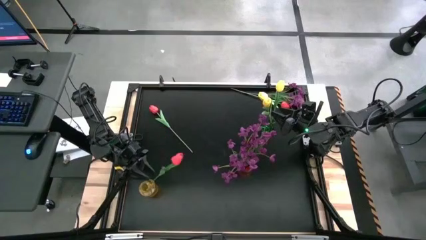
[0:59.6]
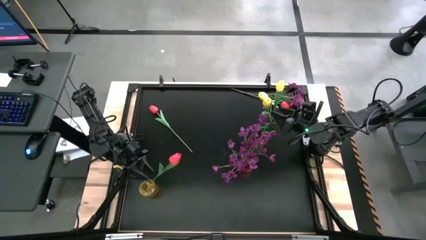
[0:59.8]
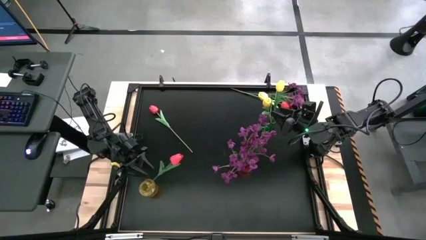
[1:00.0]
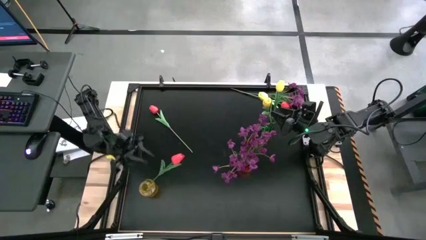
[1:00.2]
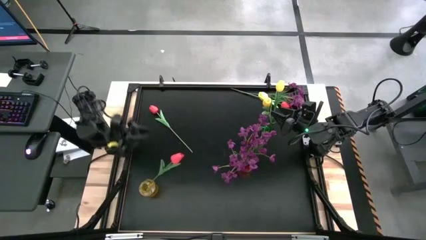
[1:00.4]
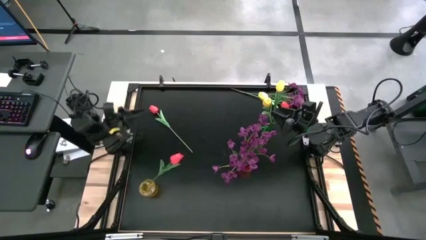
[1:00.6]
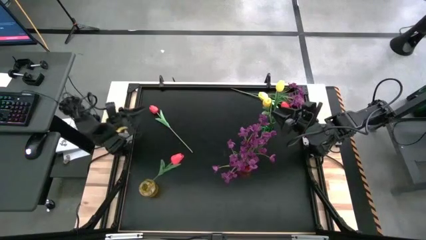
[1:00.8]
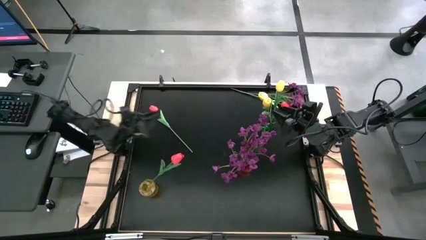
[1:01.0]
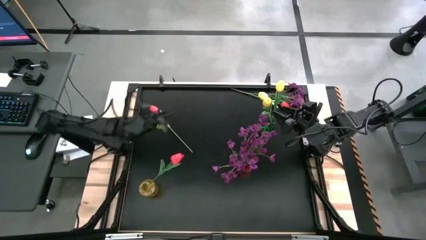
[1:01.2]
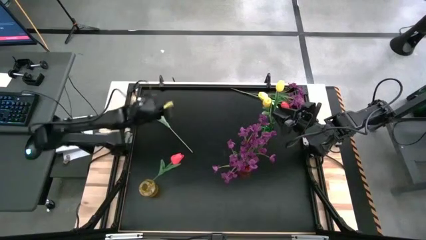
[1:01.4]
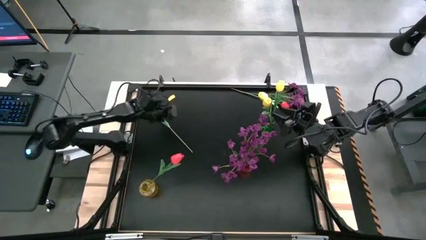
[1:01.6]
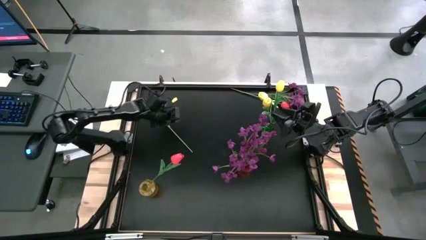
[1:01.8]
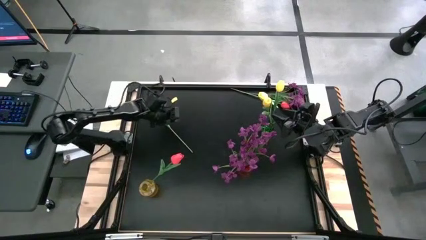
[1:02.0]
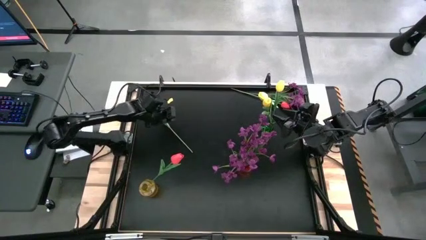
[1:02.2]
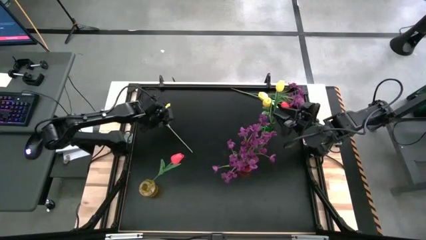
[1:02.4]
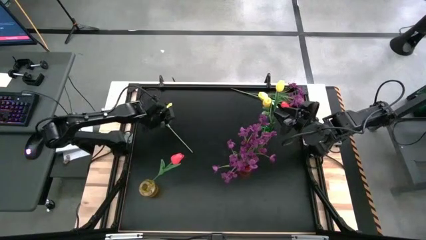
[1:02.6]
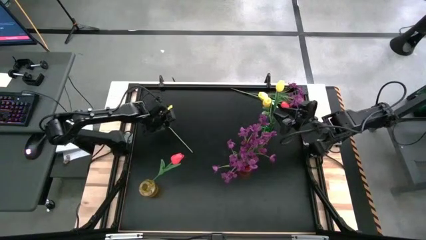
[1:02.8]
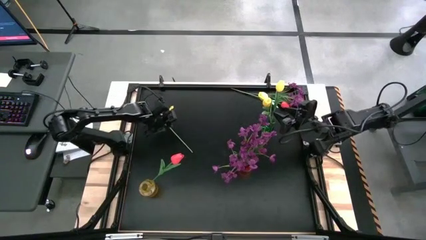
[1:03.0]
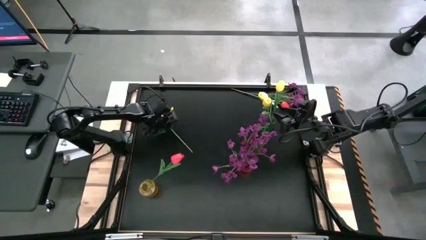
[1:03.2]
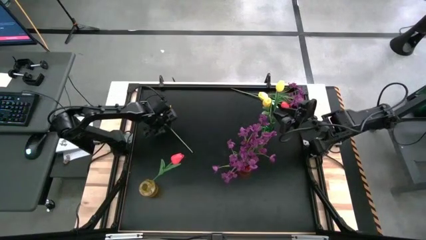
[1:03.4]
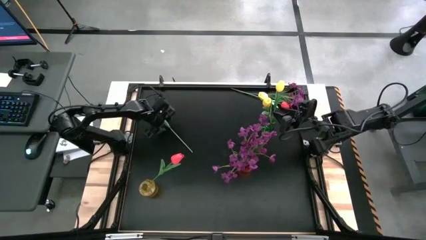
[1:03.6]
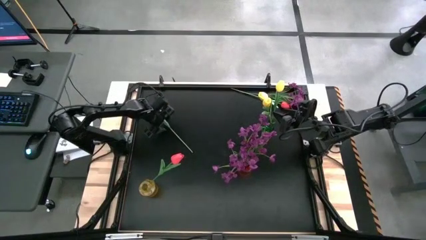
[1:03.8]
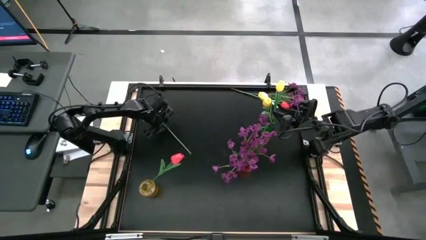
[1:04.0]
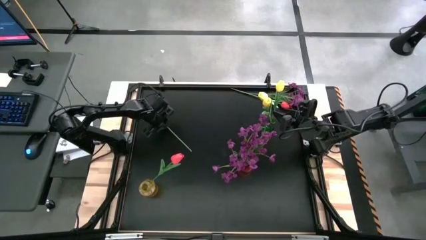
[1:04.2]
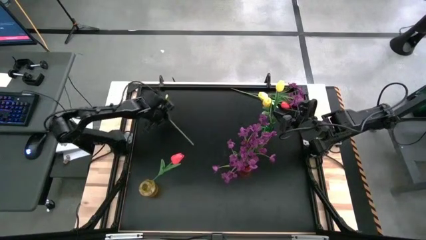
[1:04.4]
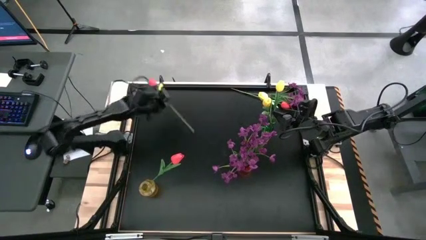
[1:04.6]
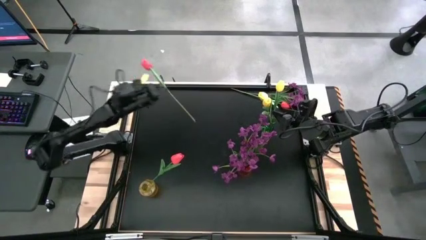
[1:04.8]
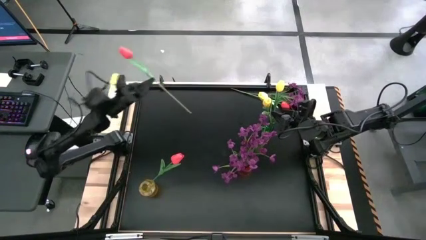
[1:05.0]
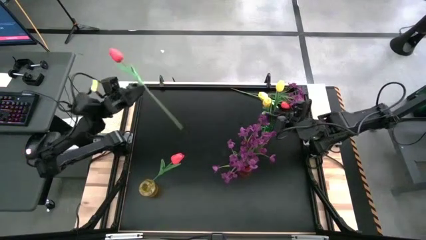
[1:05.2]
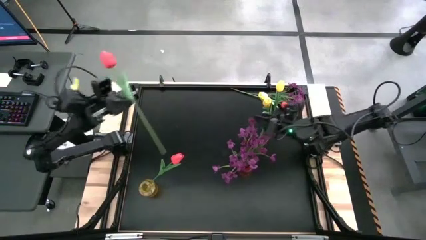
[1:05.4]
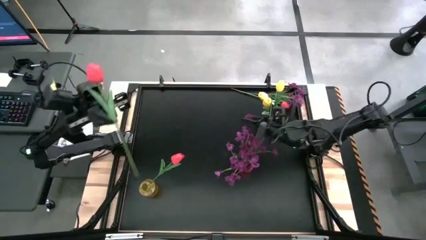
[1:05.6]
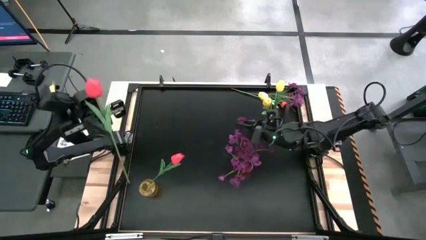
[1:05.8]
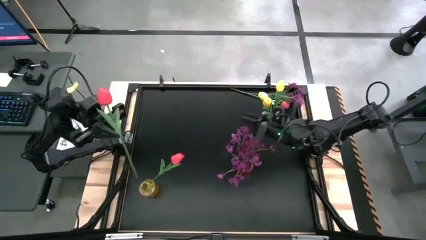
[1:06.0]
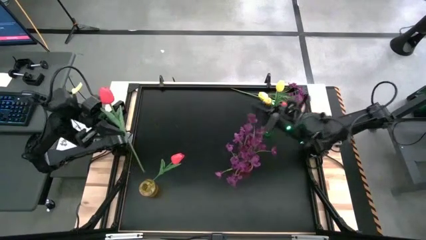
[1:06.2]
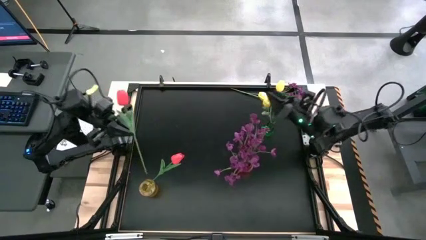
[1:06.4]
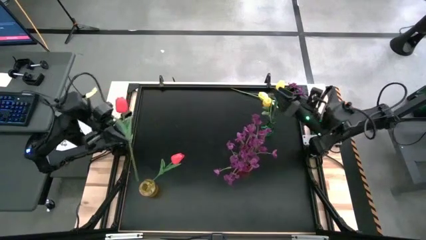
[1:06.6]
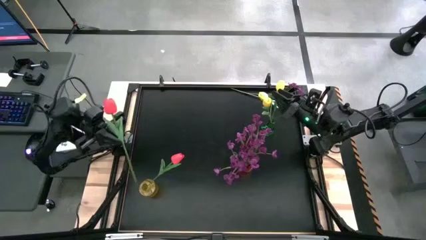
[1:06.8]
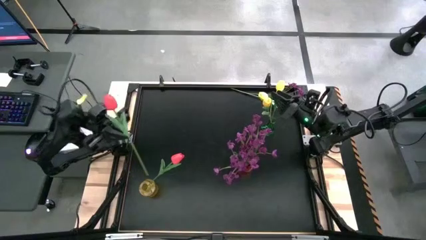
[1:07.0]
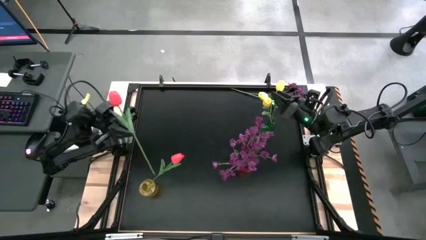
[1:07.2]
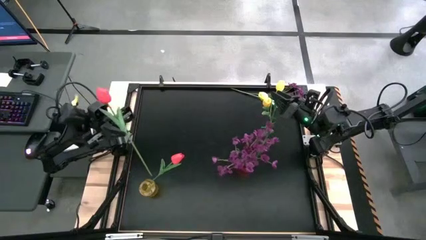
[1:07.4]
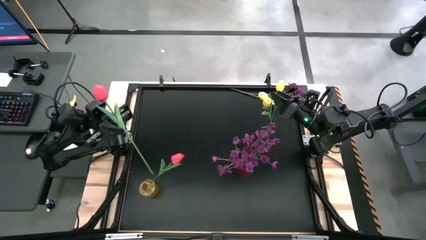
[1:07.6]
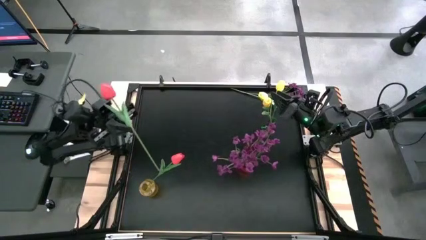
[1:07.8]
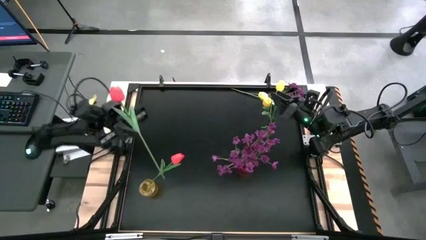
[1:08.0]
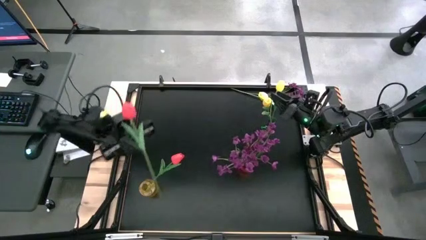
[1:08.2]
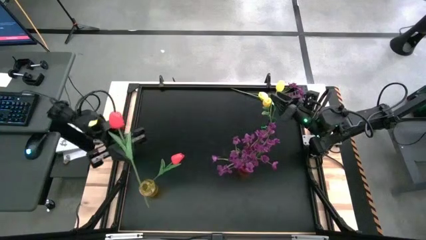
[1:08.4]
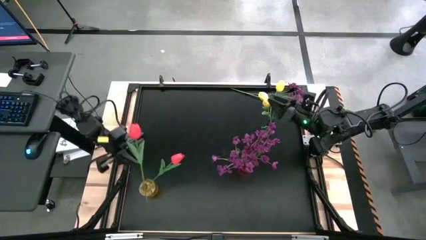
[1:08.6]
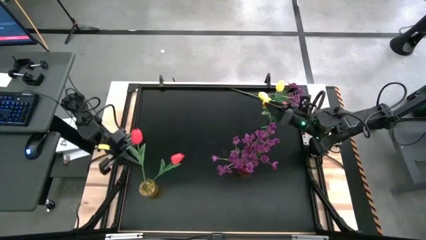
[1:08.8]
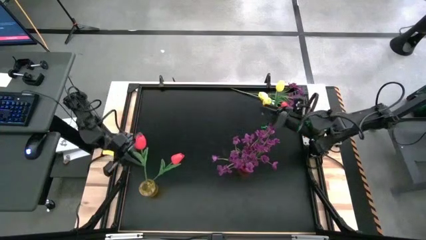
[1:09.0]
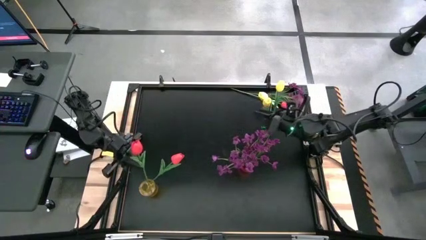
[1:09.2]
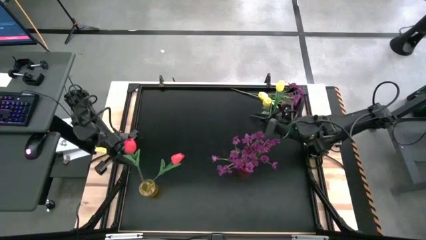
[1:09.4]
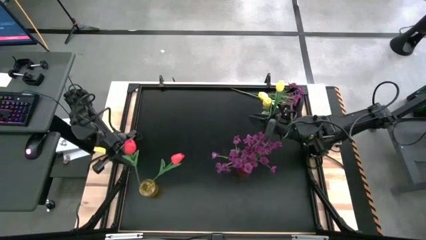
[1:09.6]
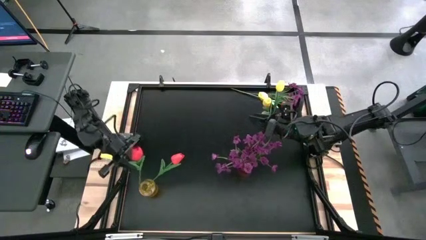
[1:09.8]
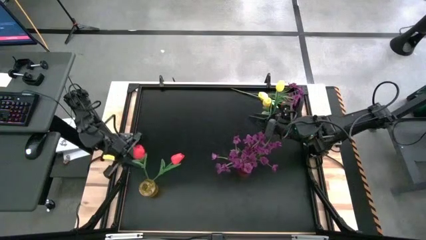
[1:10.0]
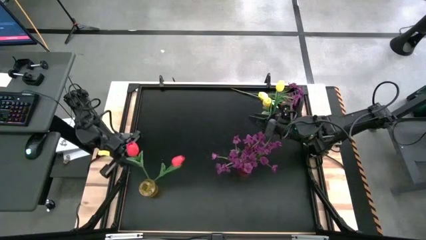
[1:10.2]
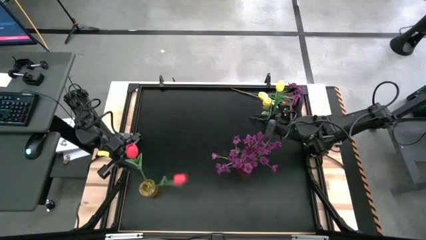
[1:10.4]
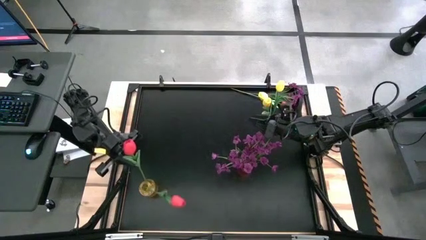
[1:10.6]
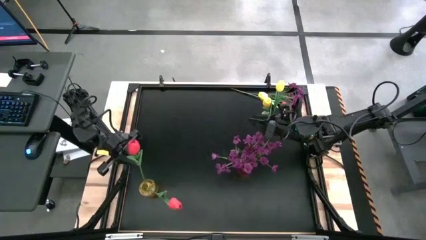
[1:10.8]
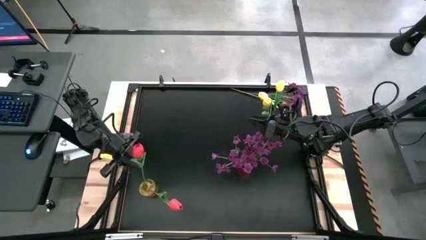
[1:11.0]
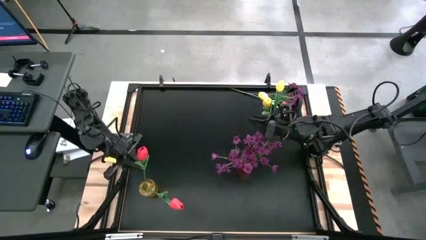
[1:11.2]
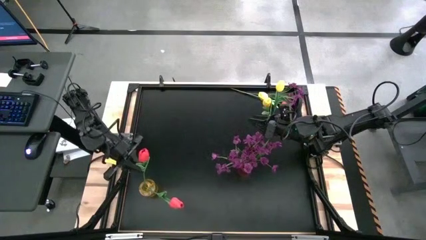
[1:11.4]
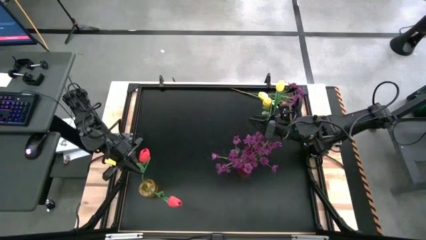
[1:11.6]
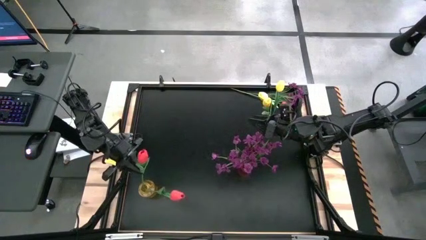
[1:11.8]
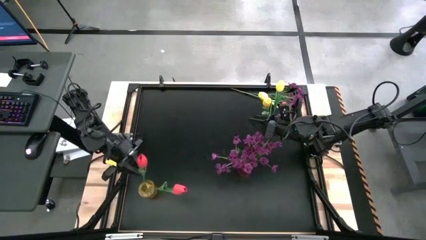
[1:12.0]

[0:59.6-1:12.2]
Task: Sort flowers into vase by color
Put the left pink tulip into the yellow flower vase

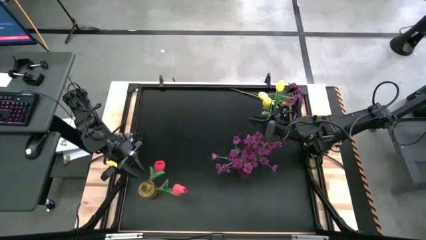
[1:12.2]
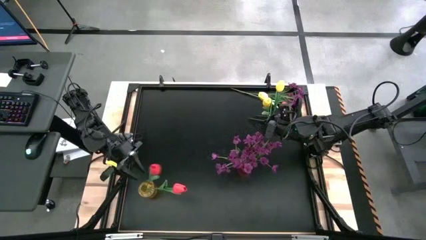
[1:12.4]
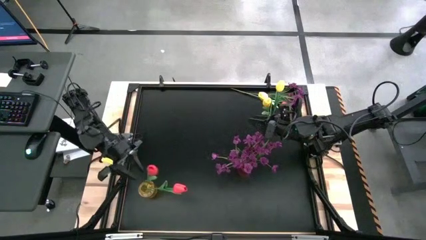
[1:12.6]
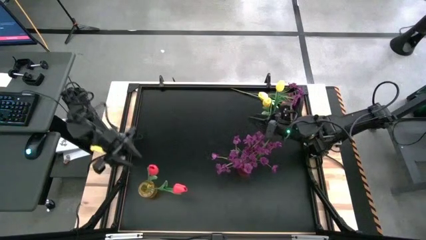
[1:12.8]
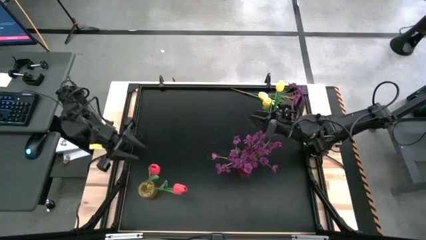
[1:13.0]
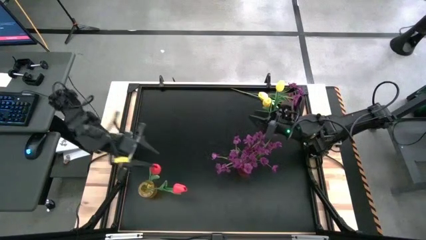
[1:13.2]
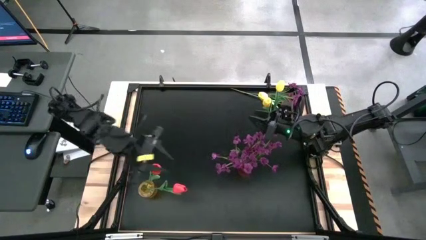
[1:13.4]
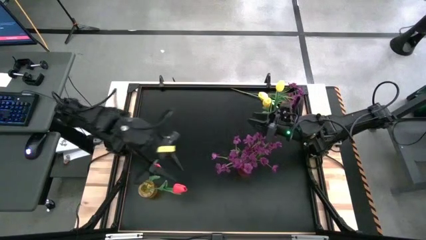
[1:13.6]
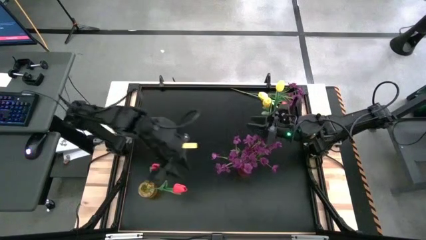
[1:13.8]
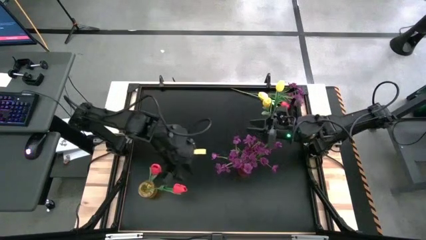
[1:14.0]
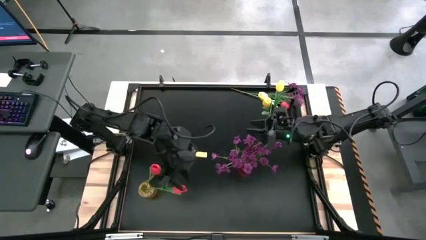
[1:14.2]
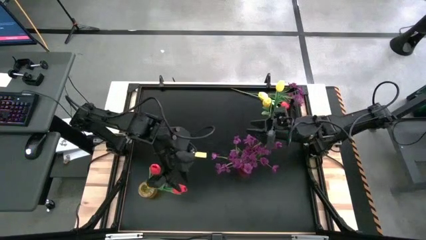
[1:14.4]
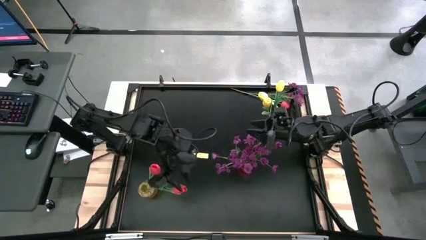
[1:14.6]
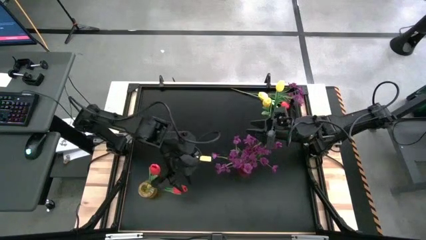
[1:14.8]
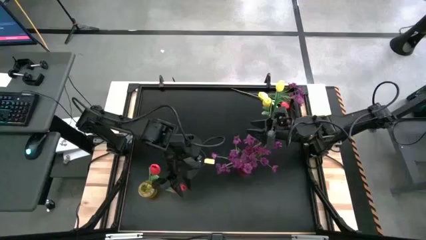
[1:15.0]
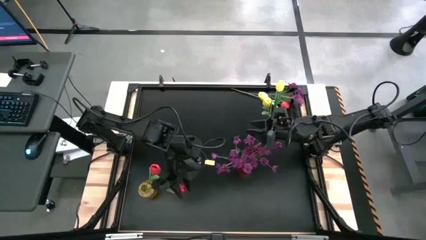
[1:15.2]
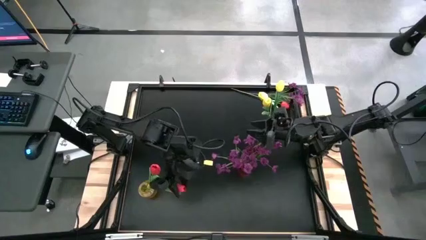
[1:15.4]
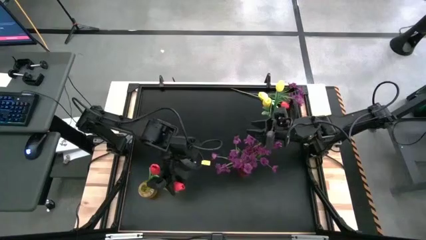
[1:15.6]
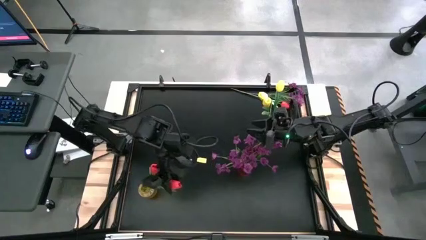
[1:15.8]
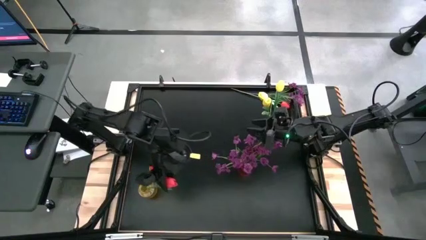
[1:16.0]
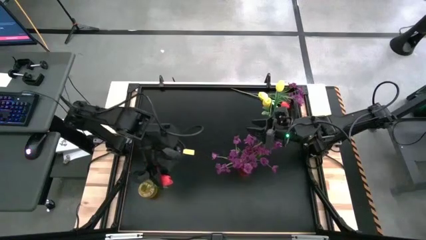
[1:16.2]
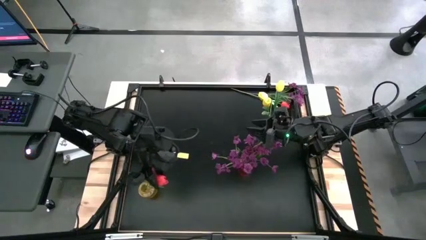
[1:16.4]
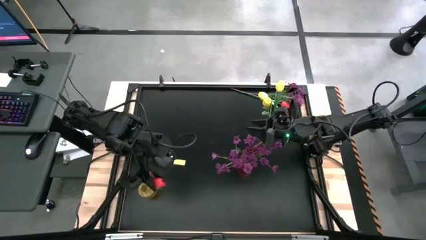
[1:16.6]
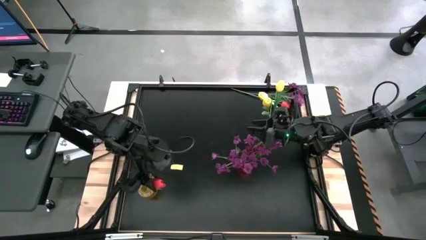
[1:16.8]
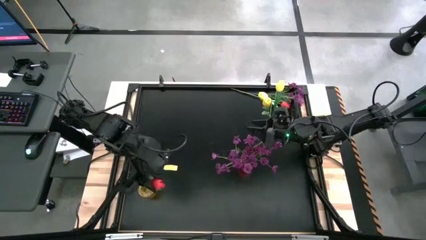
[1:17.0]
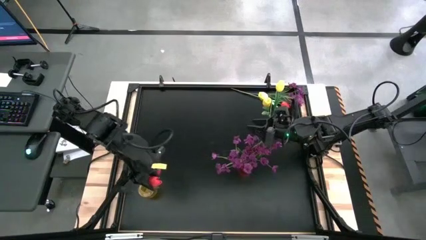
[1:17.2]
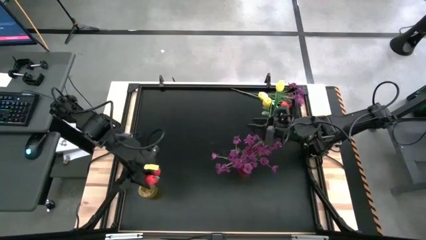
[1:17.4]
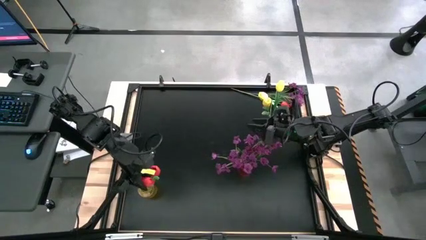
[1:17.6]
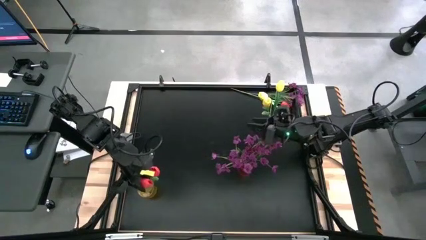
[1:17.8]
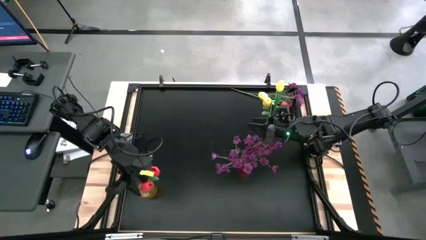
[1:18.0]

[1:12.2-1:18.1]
Adjust the right red tulip in the yellow flower vase
